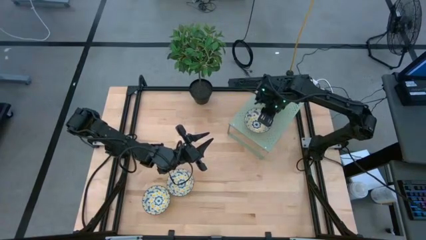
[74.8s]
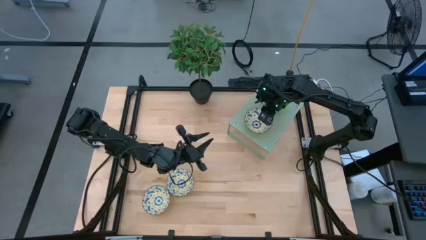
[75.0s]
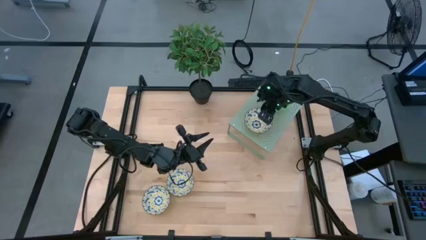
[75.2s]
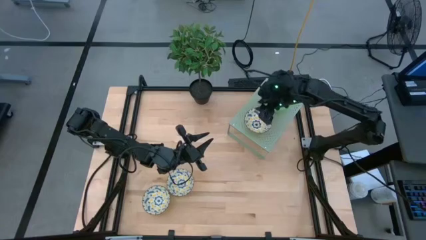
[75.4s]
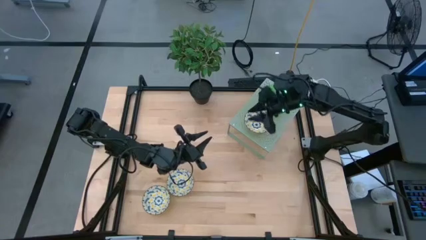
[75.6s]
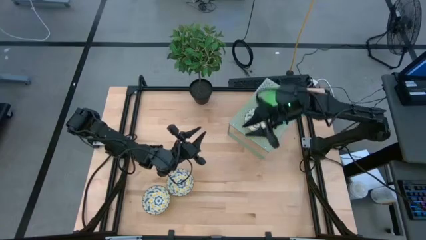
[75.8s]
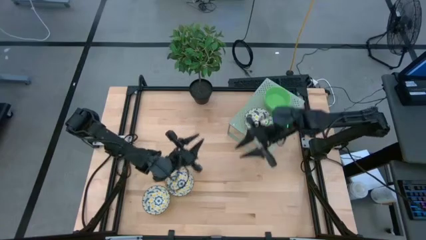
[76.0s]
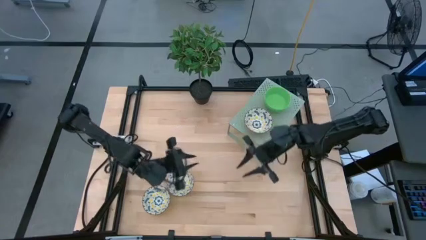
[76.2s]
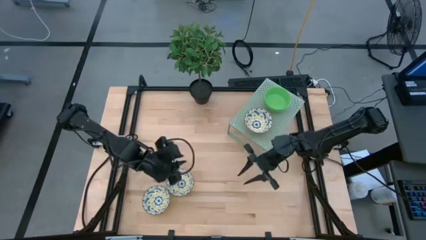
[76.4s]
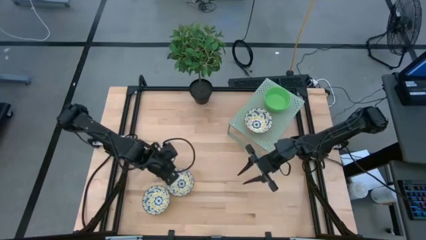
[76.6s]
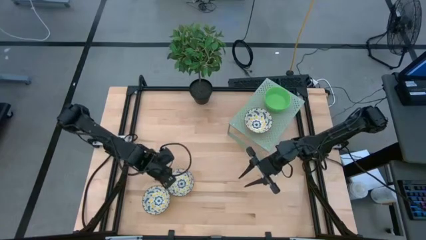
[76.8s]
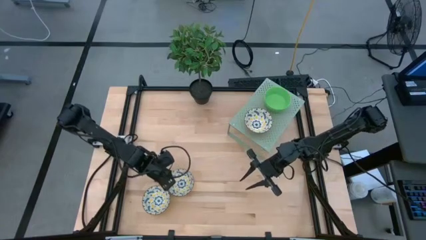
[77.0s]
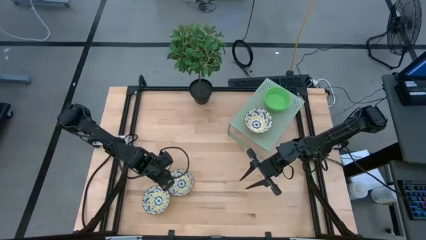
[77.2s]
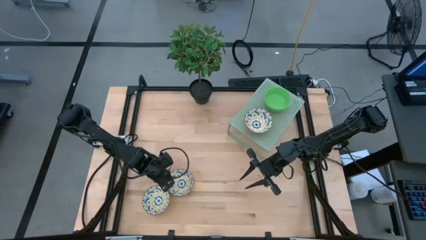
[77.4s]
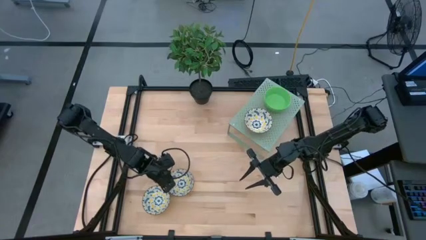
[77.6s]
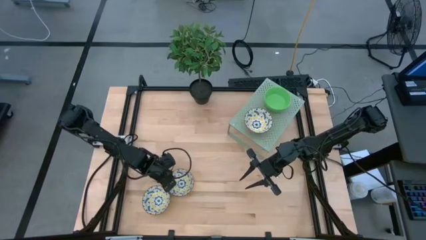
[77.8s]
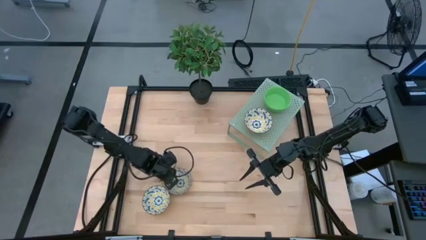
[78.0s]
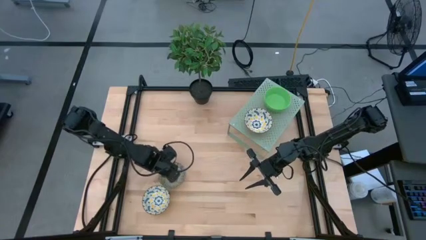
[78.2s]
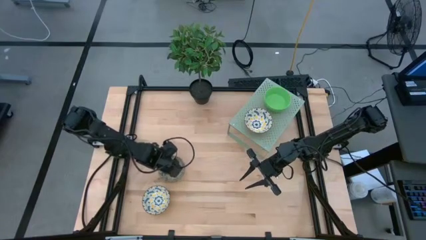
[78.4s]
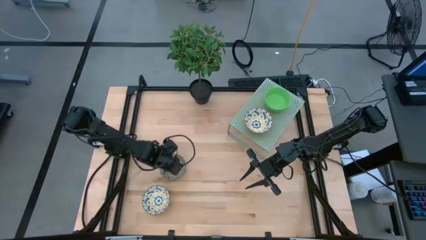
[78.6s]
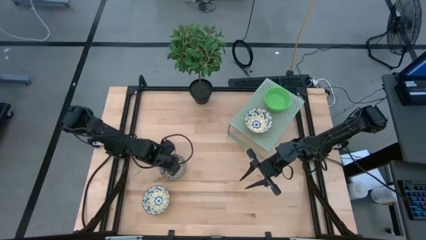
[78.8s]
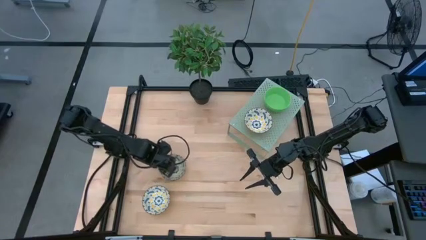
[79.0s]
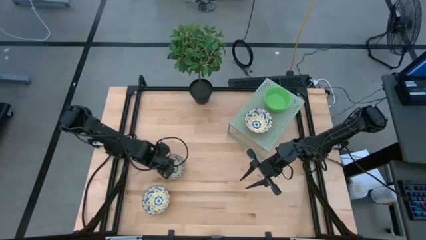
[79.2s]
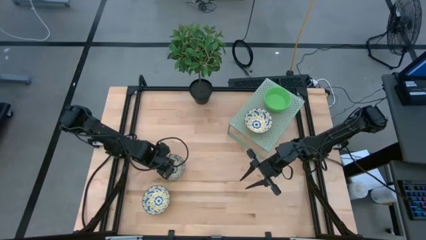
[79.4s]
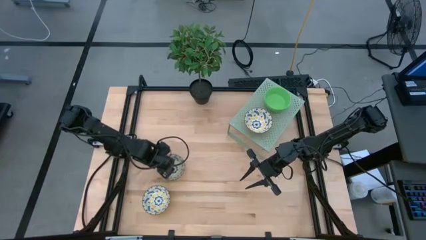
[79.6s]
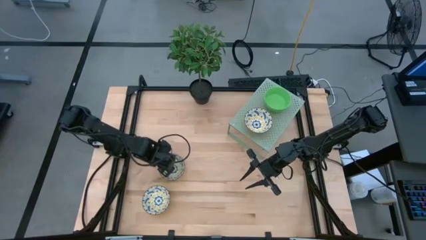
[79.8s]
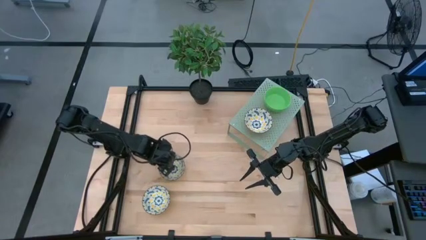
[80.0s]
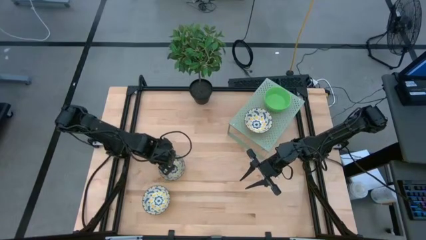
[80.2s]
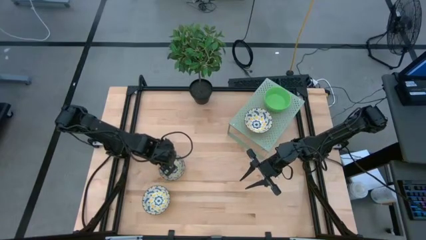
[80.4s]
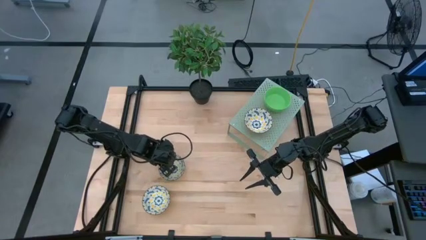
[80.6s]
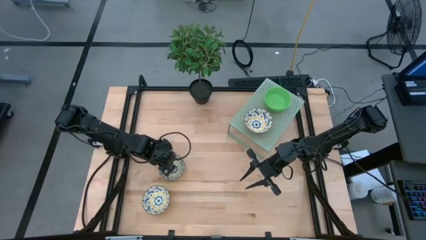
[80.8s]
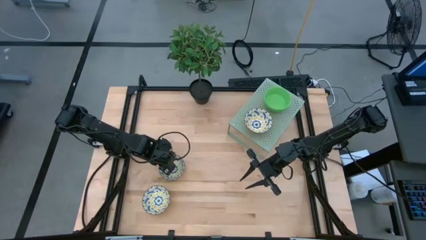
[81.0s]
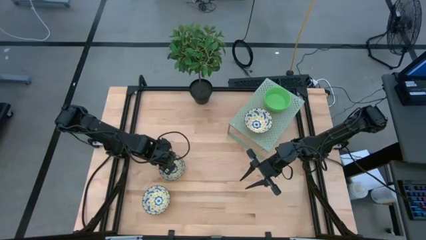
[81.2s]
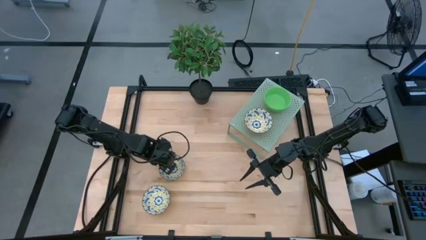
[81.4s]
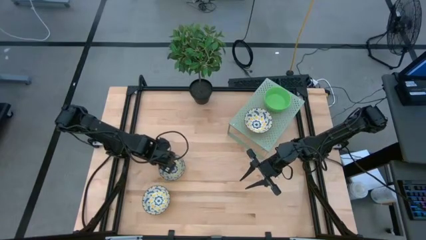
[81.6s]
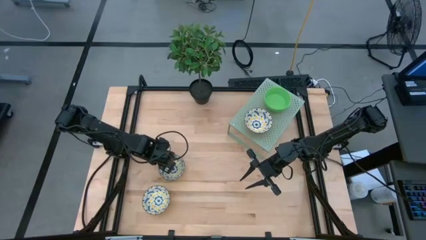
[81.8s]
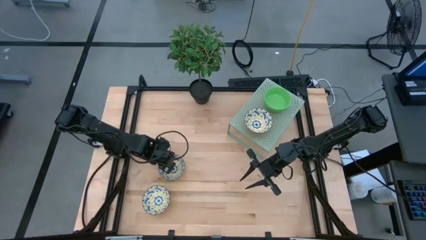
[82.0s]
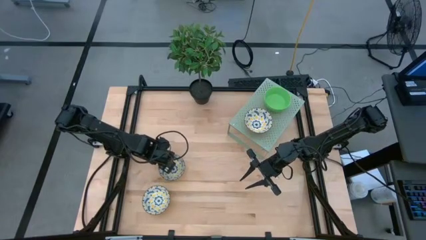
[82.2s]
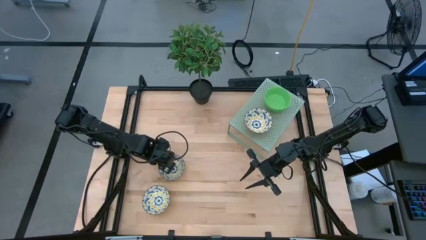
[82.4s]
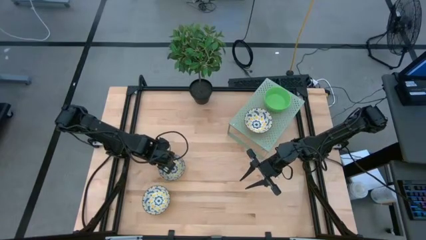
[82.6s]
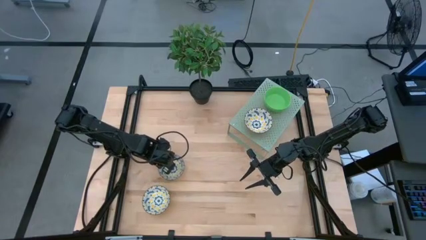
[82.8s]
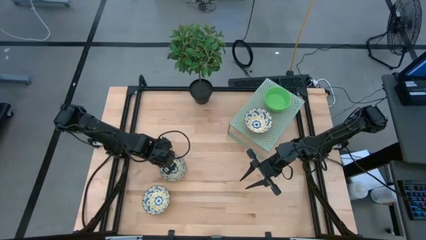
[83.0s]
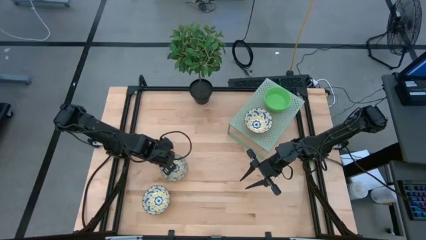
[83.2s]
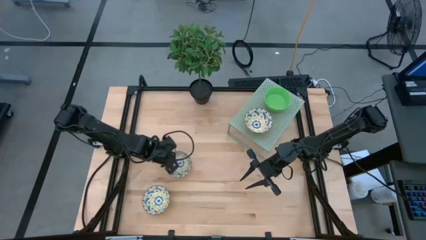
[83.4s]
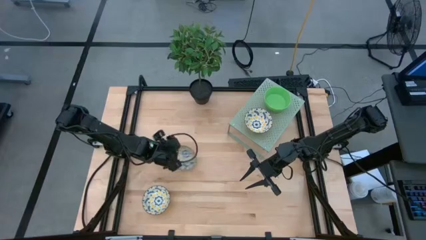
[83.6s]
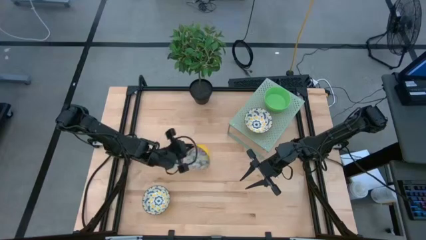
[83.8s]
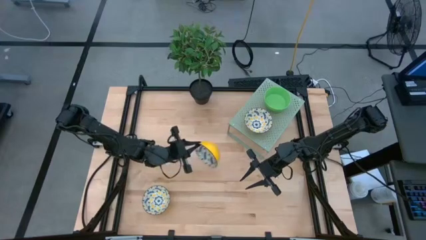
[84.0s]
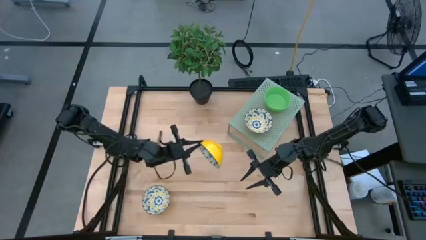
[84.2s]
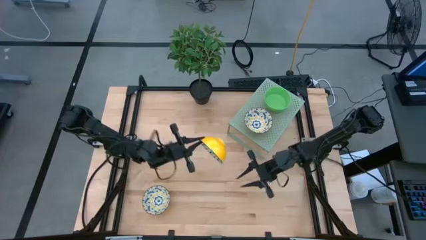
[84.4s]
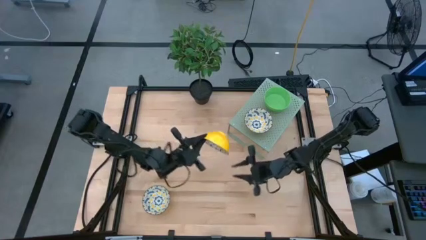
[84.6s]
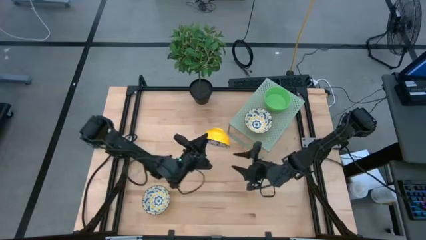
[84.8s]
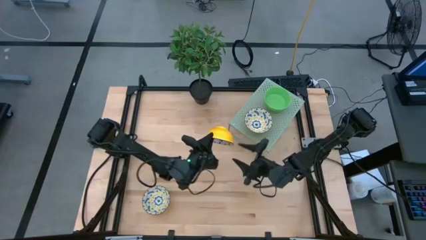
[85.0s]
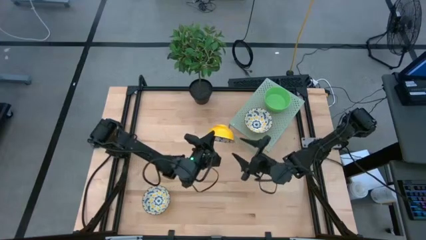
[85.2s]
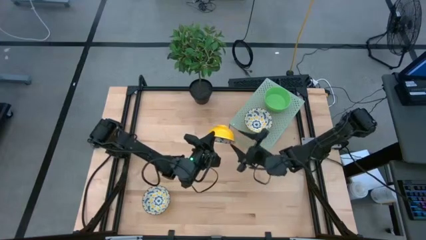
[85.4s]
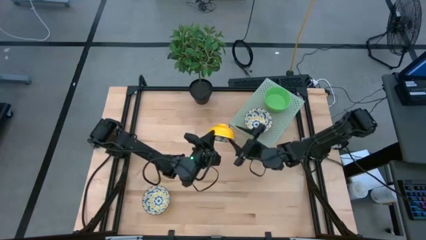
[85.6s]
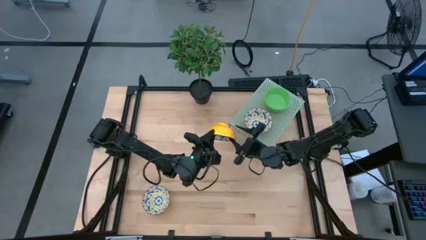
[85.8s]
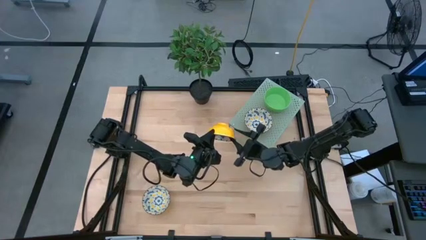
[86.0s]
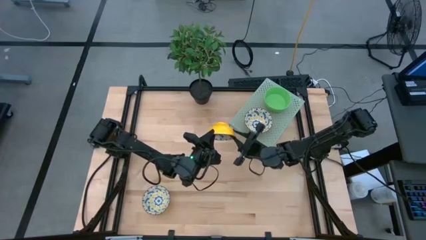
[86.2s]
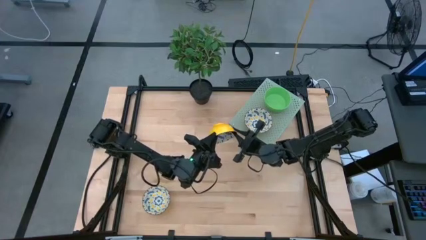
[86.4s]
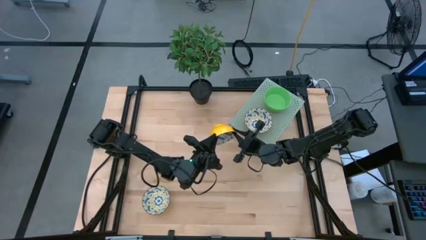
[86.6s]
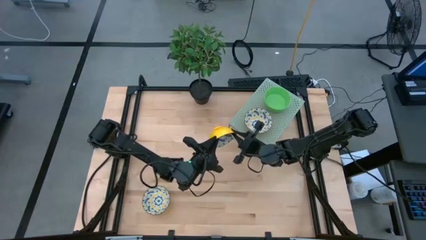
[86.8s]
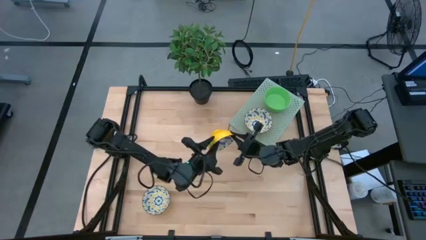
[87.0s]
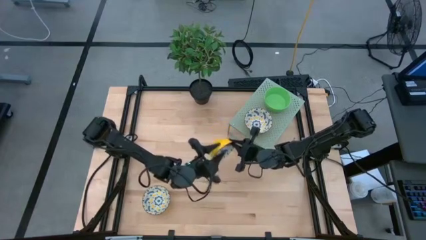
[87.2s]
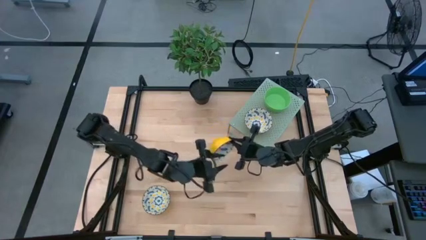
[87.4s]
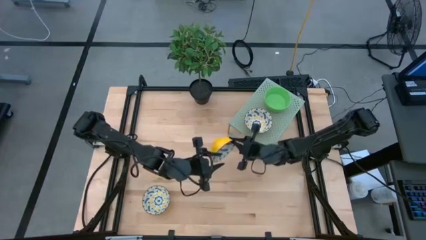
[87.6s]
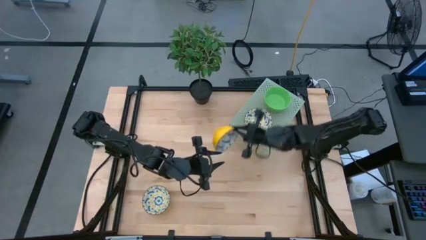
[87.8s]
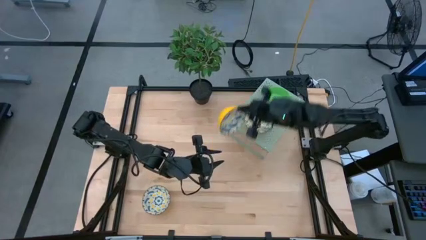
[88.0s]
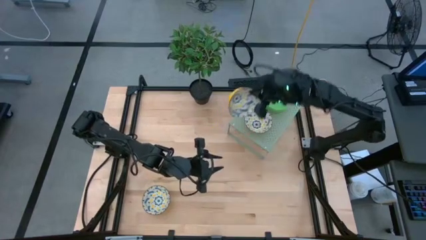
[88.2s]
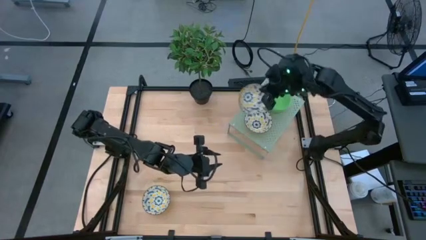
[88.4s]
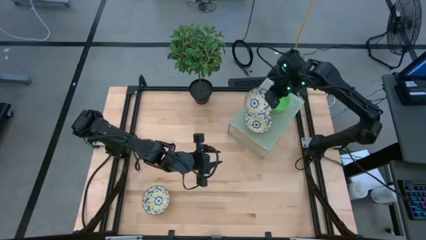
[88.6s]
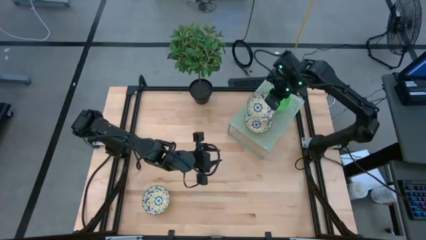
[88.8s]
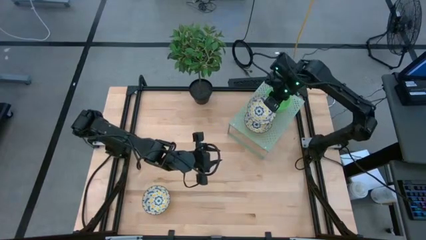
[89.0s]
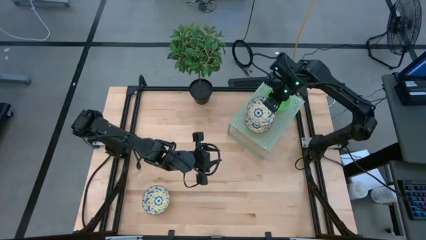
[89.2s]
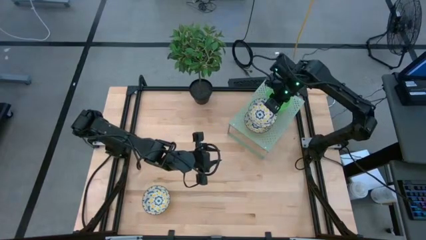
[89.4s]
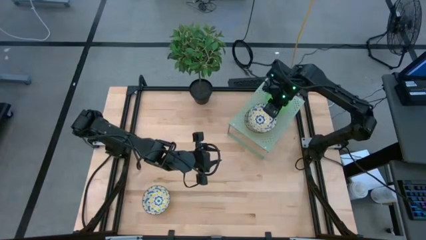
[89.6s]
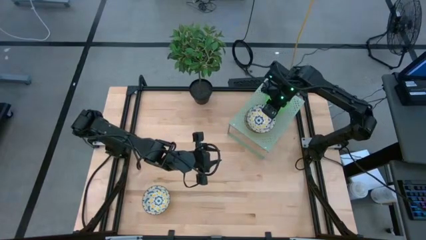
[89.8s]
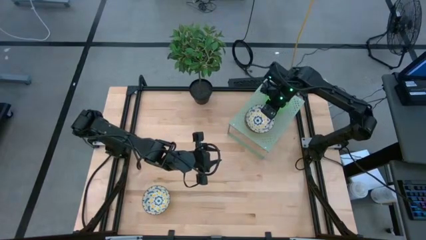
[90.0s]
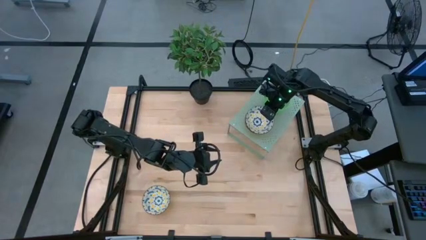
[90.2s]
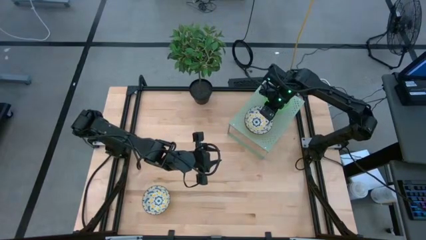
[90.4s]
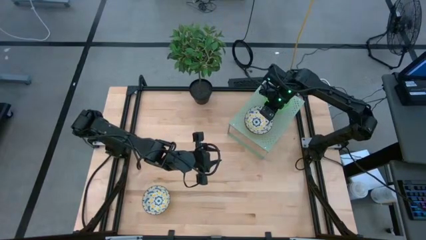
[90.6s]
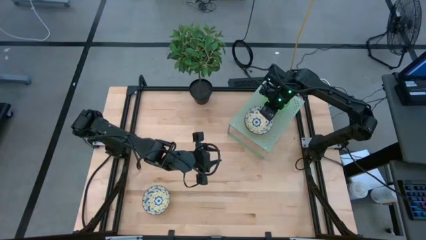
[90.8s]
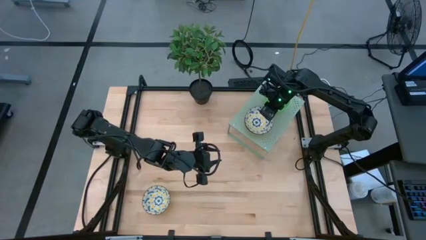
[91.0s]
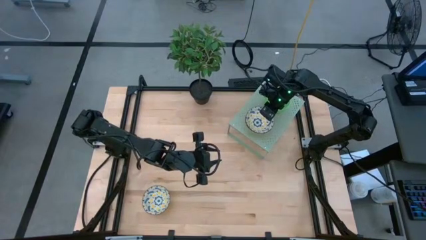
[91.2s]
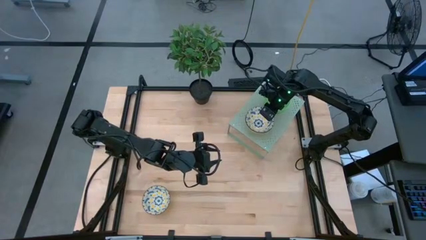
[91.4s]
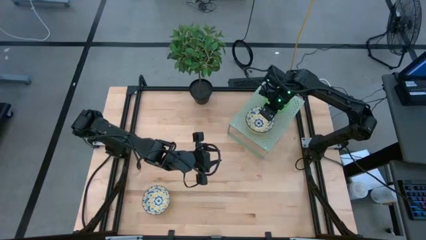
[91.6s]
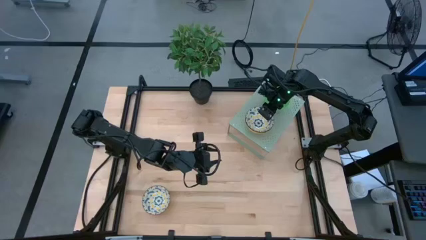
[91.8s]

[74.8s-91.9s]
Task: Pick & Place Mini bowls
Stack the top white patterned bowl on the white patterned bowl on the shelf
